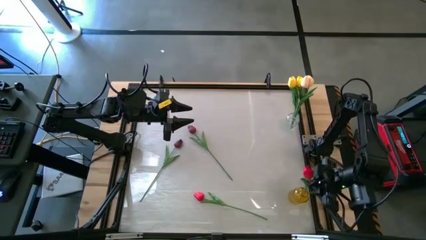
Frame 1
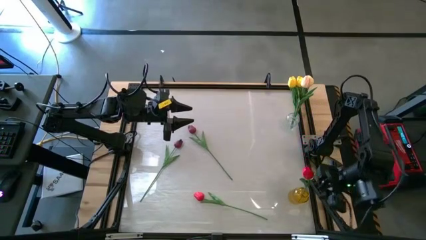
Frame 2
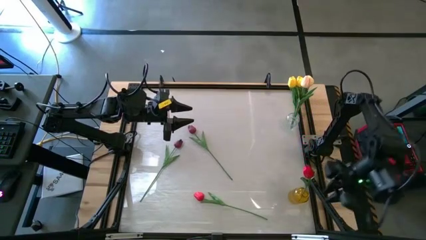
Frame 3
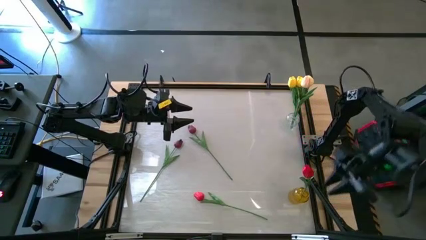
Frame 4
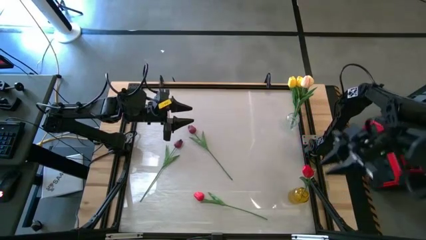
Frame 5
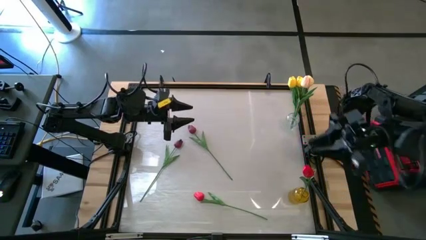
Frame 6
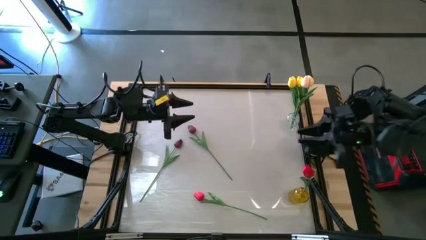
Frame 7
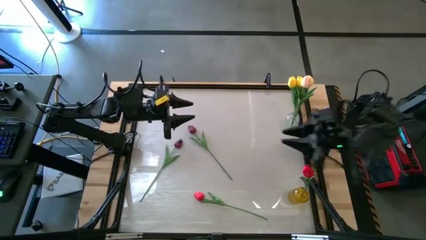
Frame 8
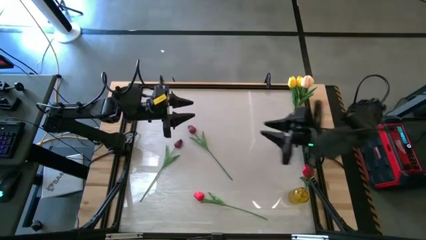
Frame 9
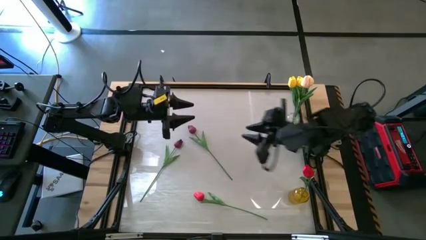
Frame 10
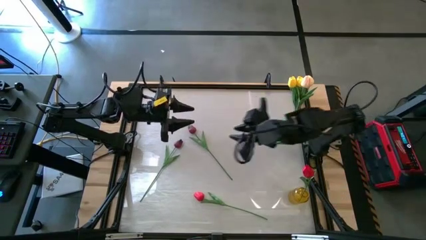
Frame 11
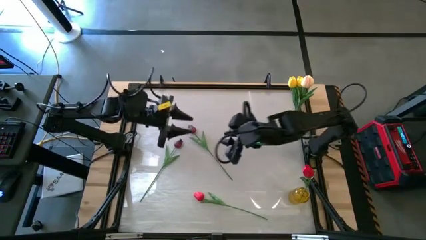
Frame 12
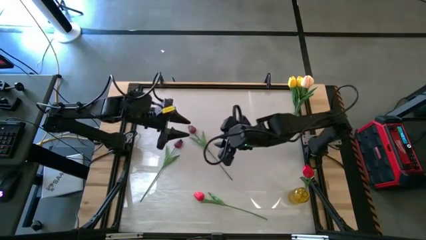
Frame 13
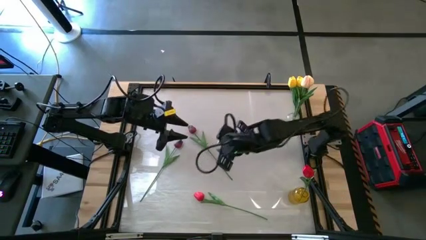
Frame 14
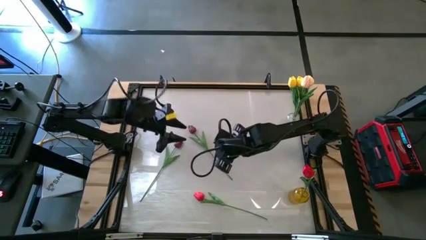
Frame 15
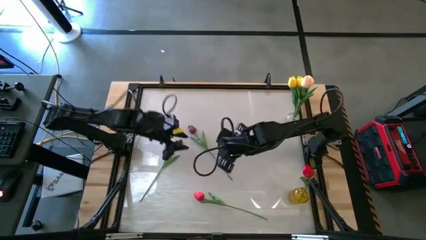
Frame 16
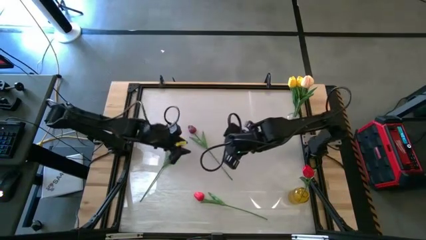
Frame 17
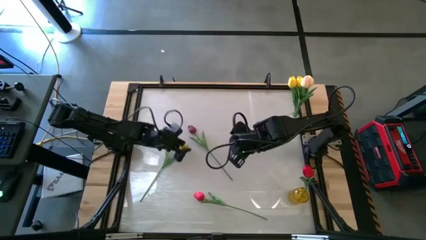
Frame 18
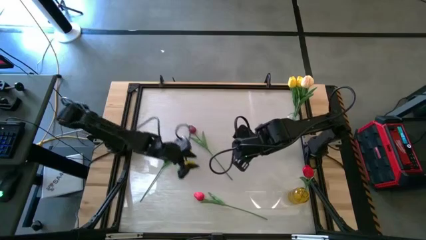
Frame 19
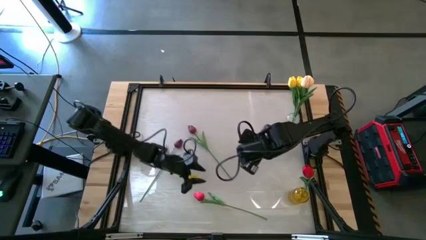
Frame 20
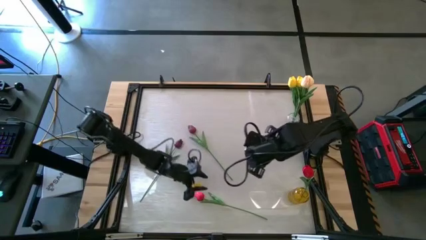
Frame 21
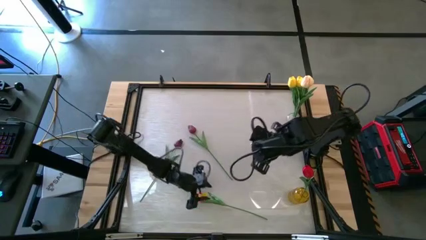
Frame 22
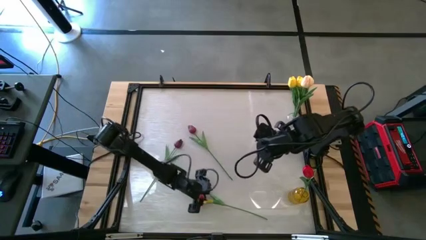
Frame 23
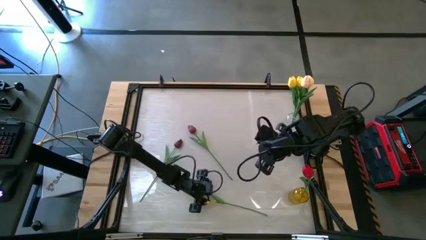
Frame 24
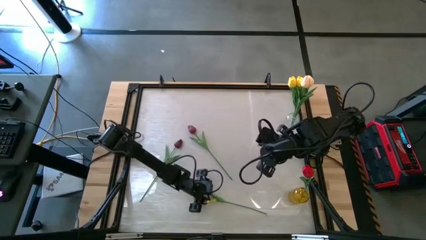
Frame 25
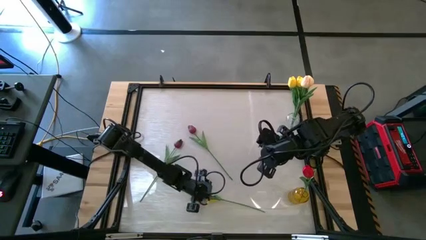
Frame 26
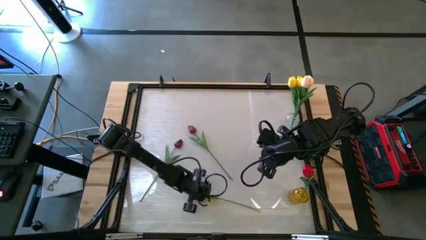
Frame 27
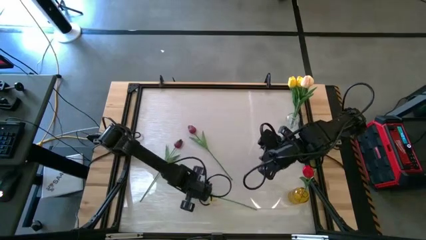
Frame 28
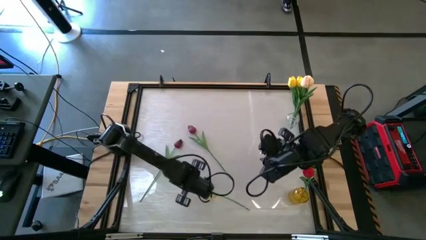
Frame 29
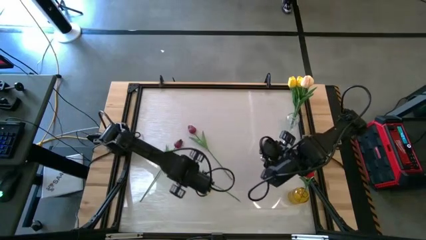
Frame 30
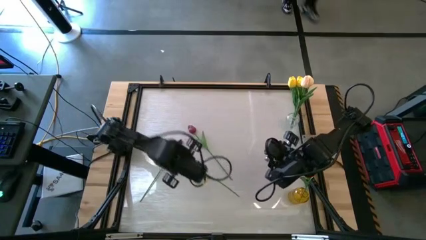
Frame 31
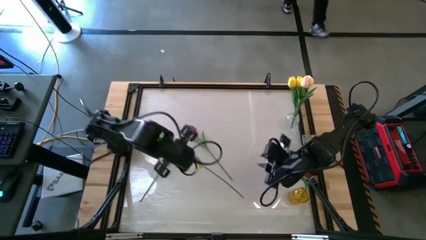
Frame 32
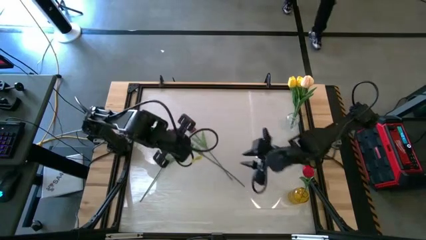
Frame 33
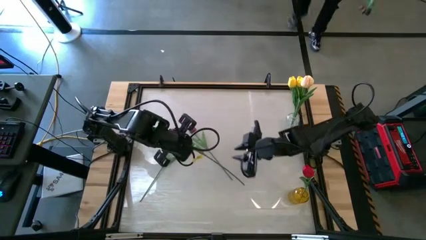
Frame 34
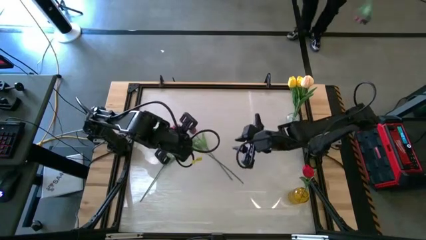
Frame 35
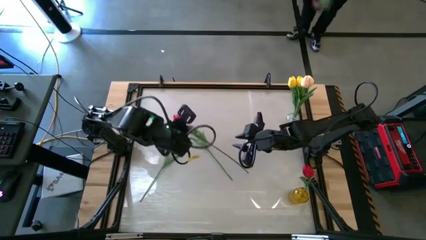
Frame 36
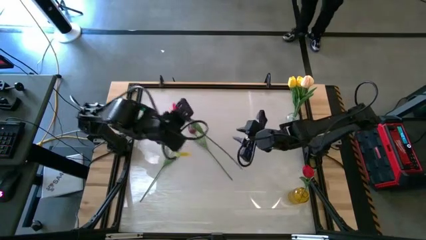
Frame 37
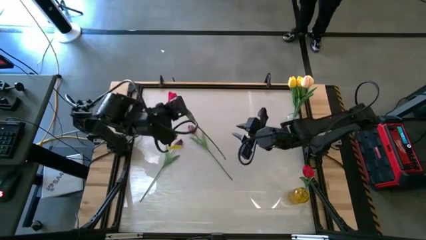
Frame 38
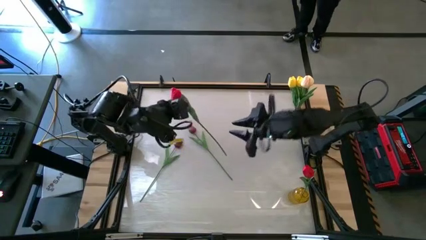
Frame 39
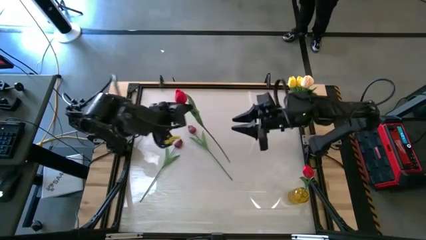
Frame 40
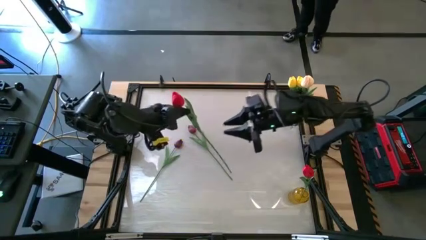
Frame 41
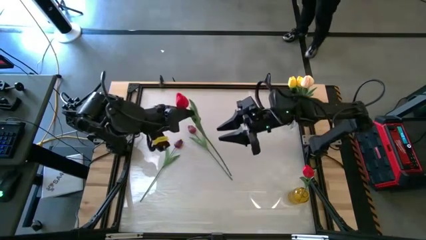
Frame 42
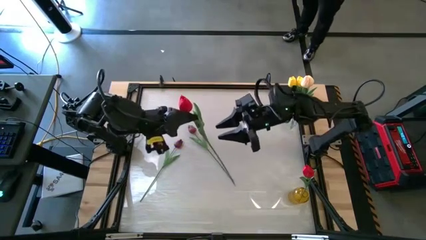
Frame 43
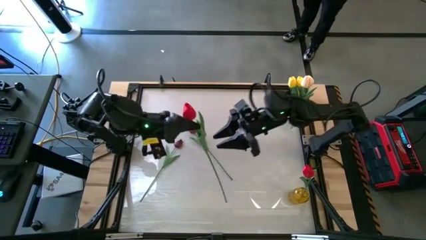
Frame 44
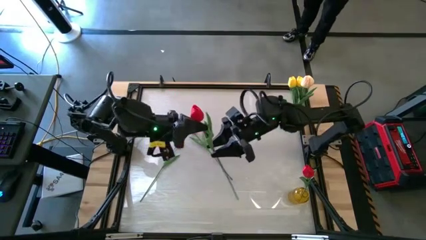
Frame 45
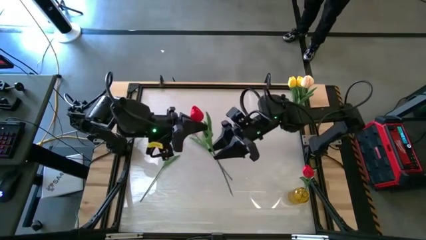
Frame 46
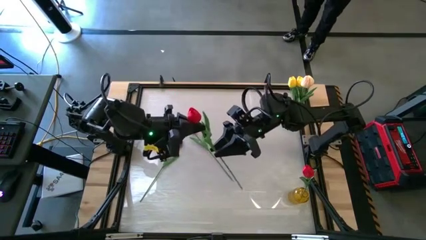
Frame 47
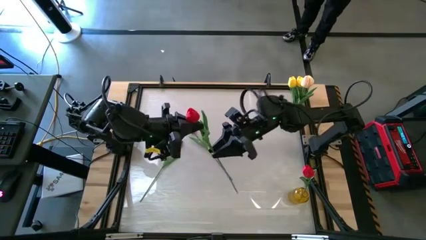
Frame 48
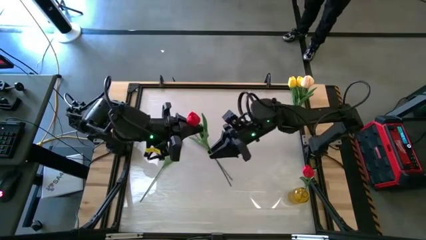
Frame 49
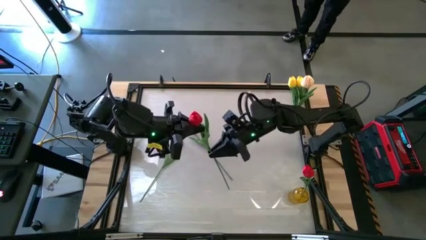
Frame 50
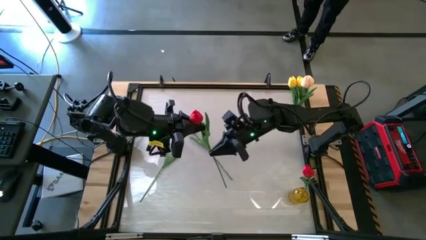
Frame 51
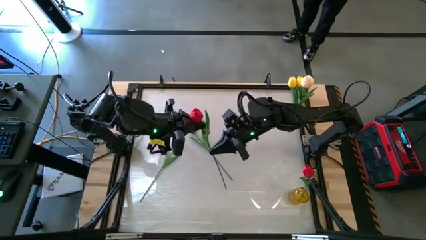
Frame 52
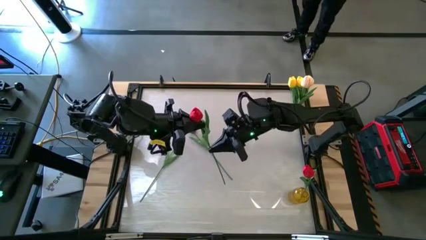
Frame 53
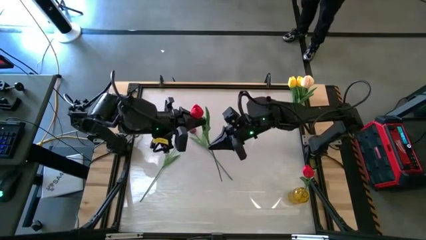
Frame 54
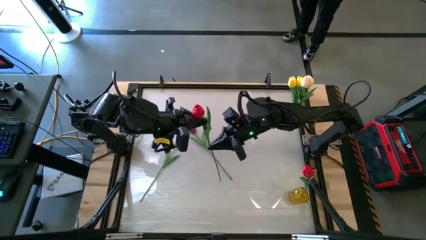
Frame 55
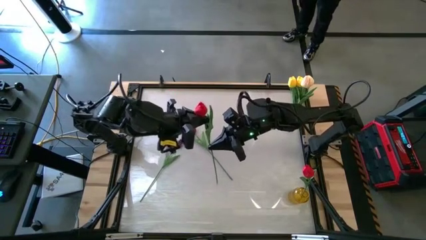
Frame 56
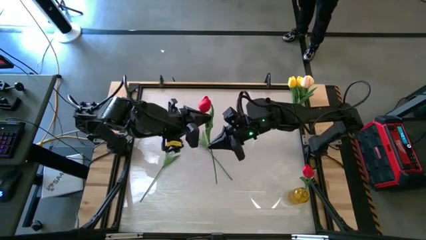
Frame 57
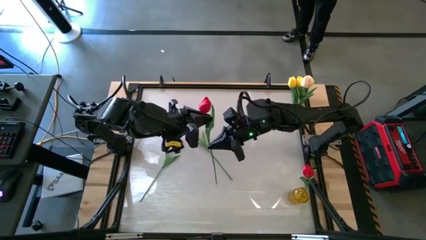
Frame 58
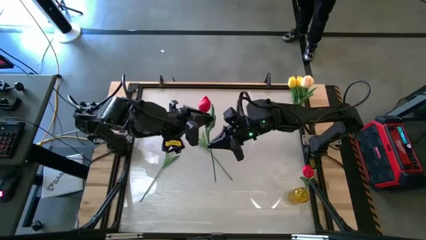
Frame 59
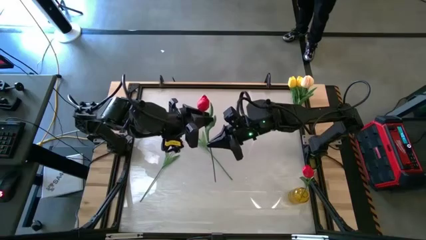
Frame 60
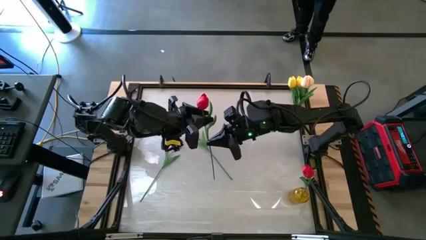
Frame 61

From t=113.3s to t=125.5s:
Task: Sort flowers into vase by color
Put the red tulip into the yellow vase
